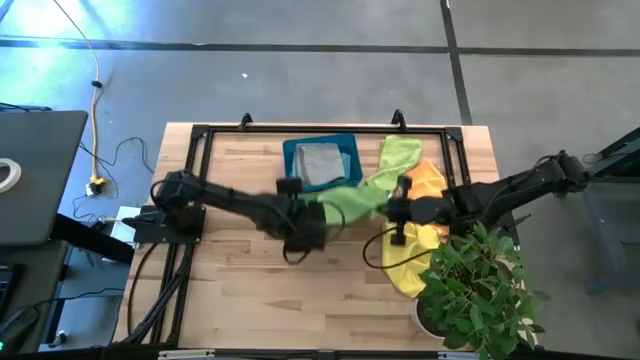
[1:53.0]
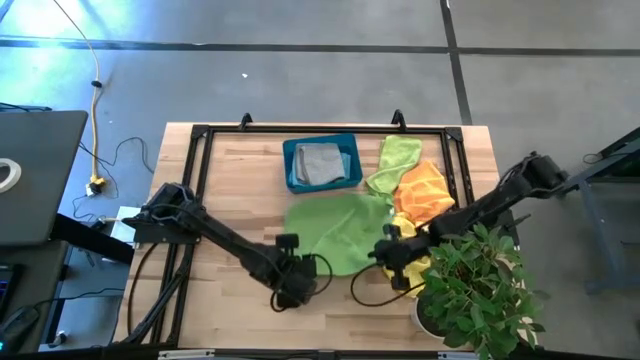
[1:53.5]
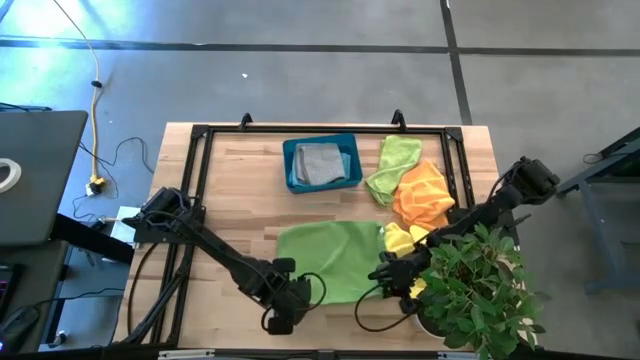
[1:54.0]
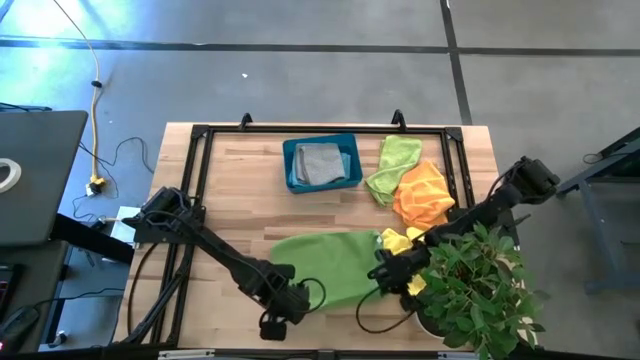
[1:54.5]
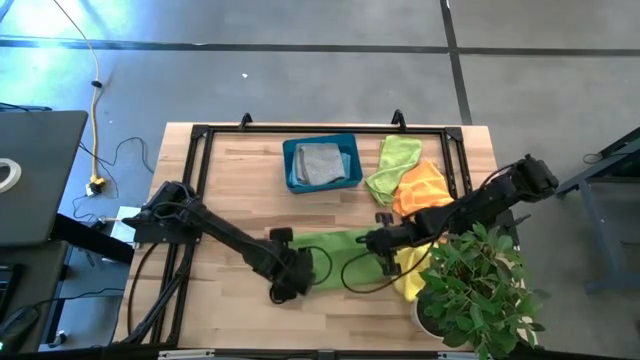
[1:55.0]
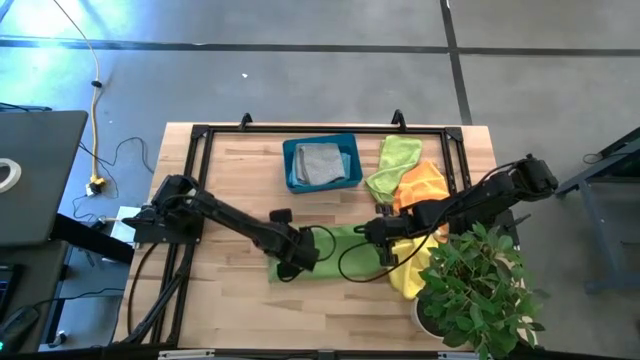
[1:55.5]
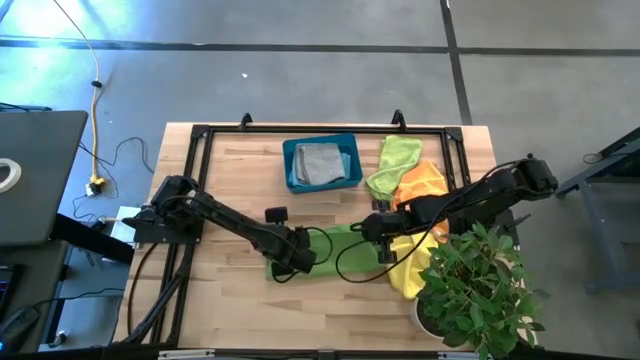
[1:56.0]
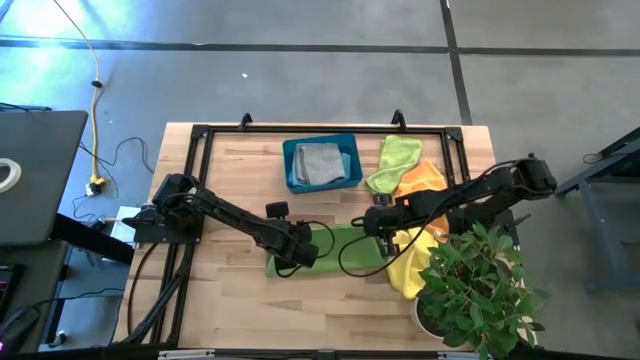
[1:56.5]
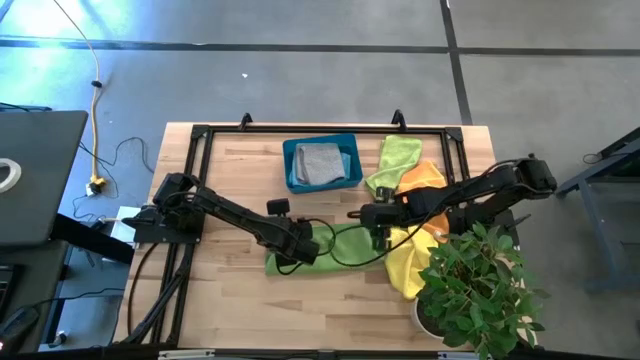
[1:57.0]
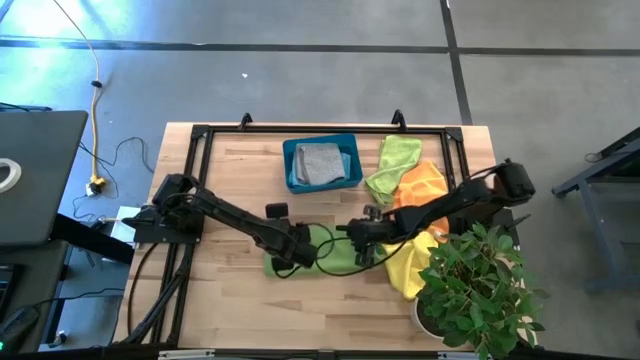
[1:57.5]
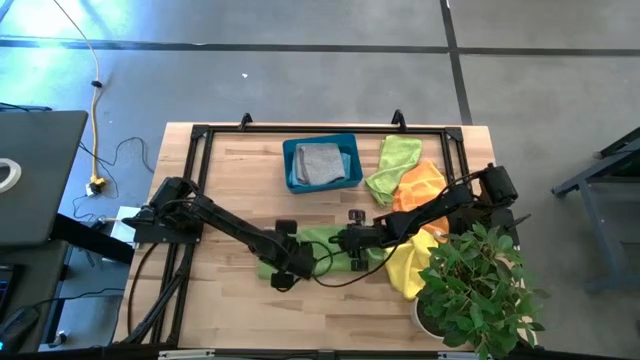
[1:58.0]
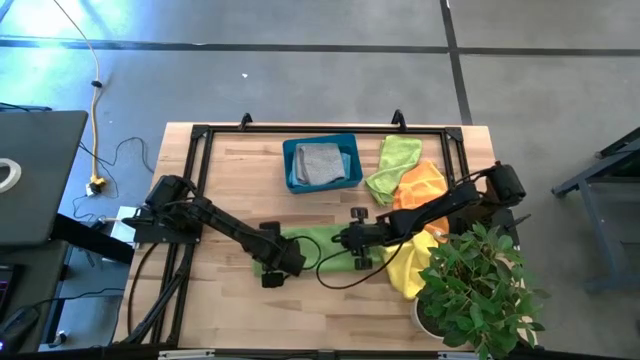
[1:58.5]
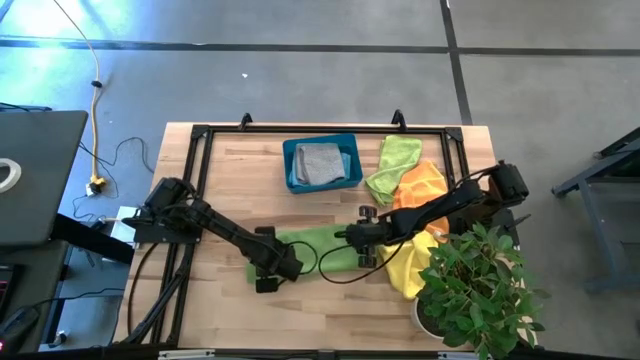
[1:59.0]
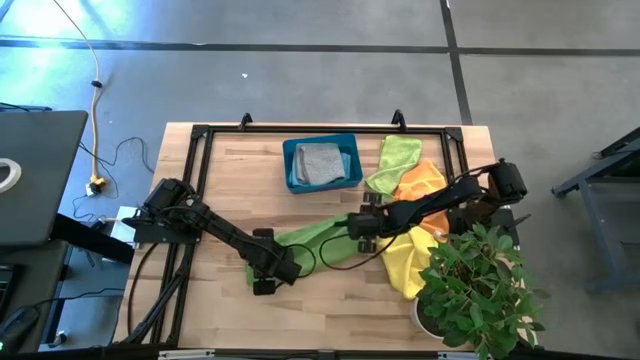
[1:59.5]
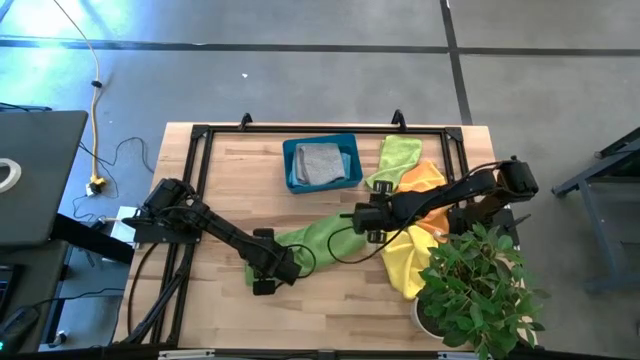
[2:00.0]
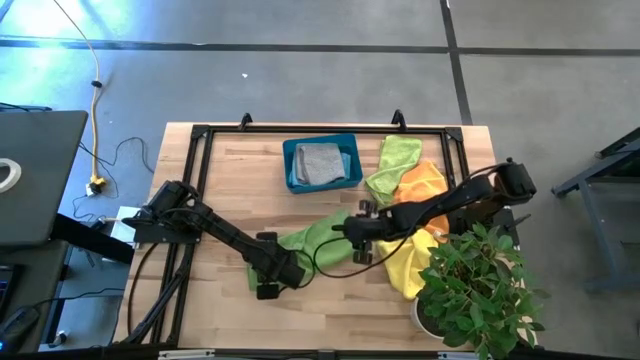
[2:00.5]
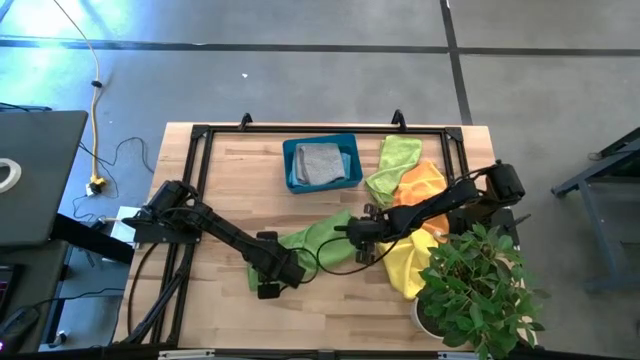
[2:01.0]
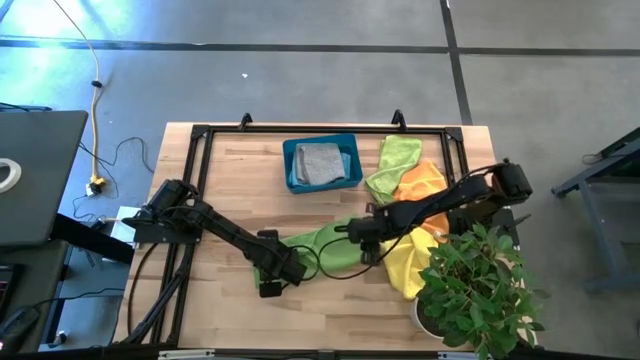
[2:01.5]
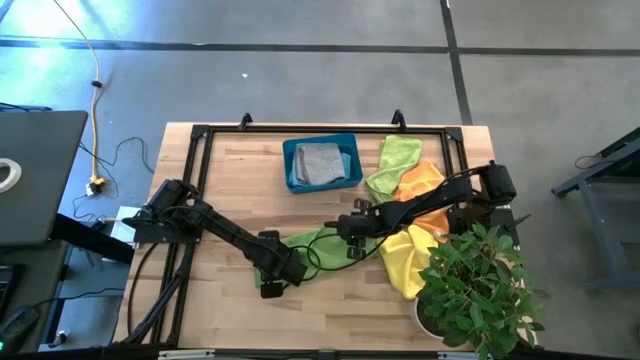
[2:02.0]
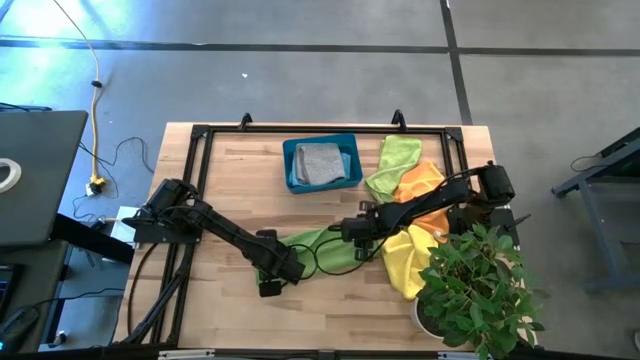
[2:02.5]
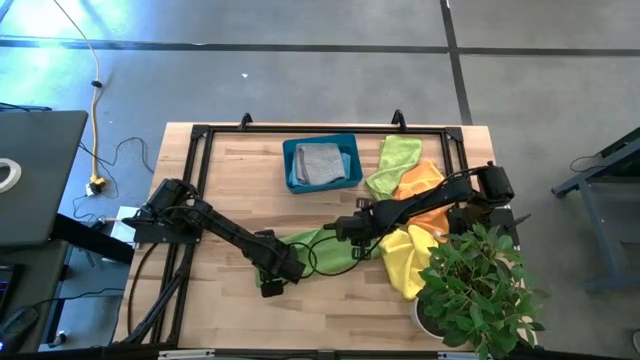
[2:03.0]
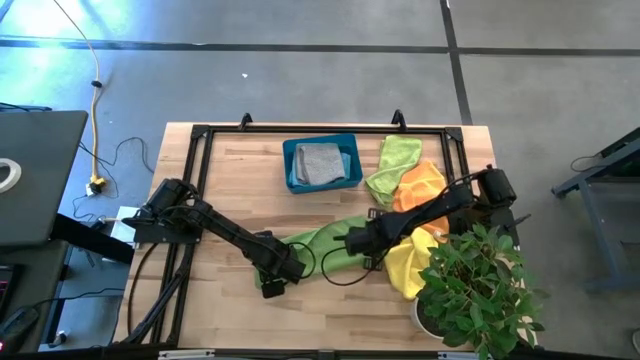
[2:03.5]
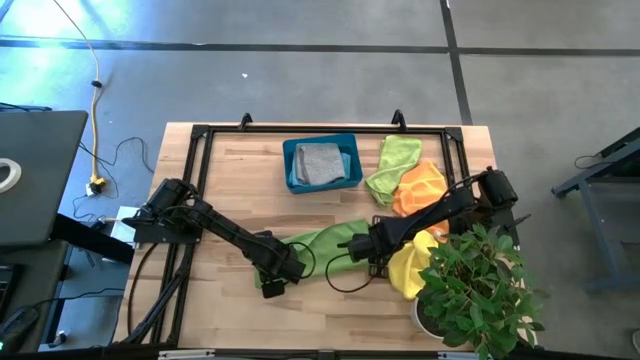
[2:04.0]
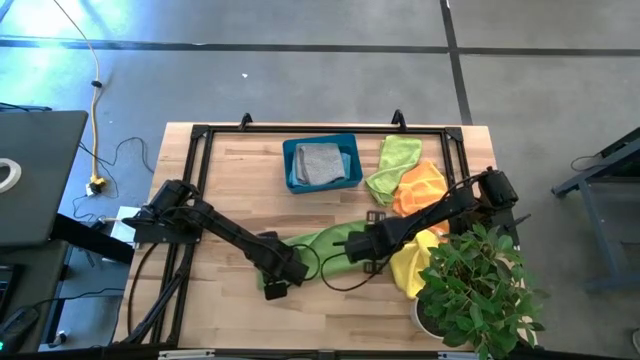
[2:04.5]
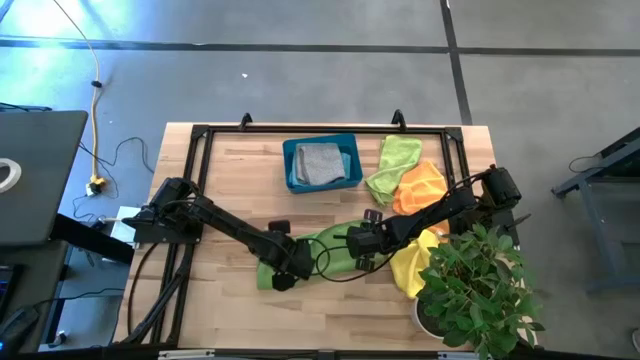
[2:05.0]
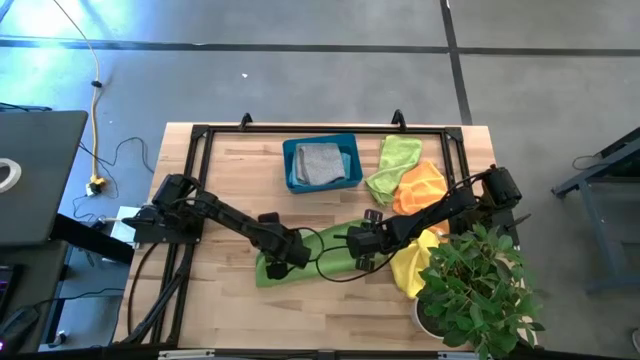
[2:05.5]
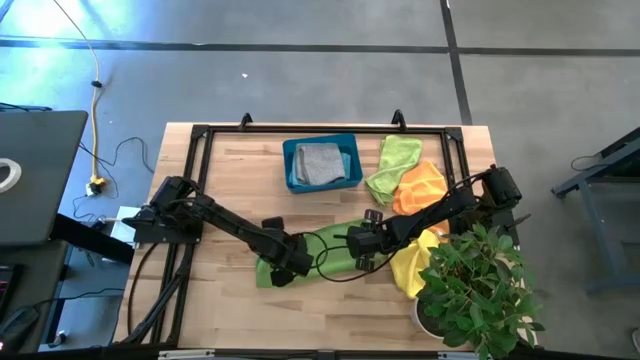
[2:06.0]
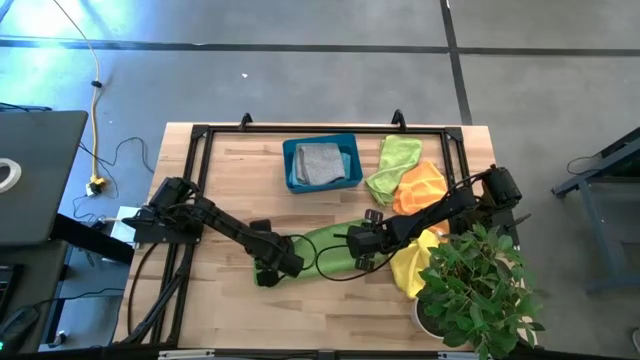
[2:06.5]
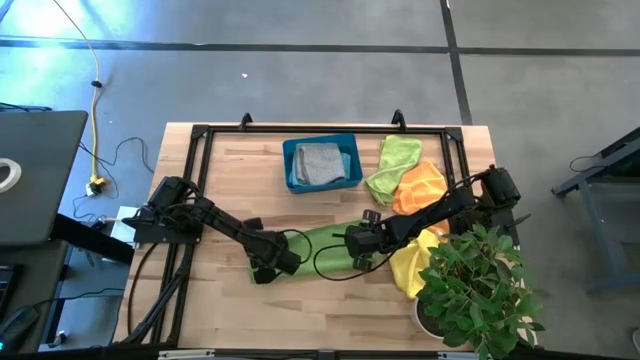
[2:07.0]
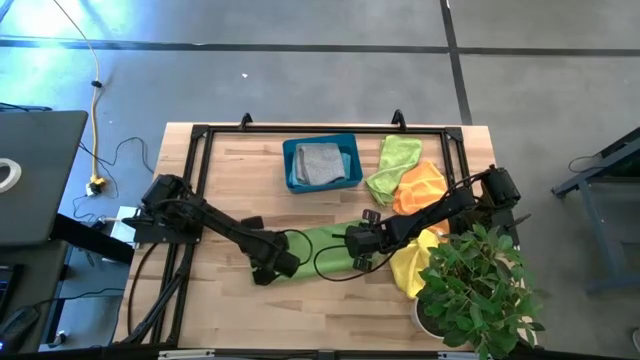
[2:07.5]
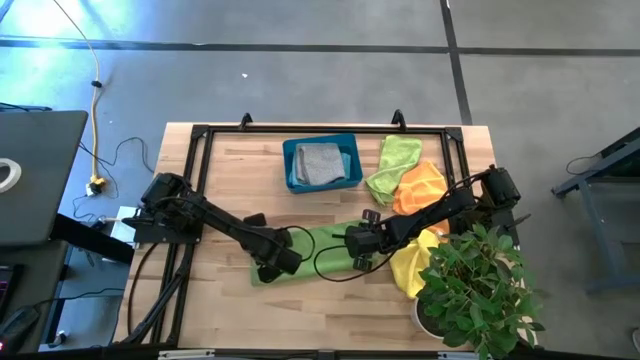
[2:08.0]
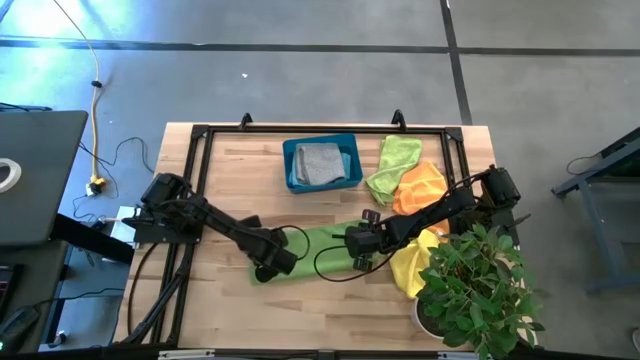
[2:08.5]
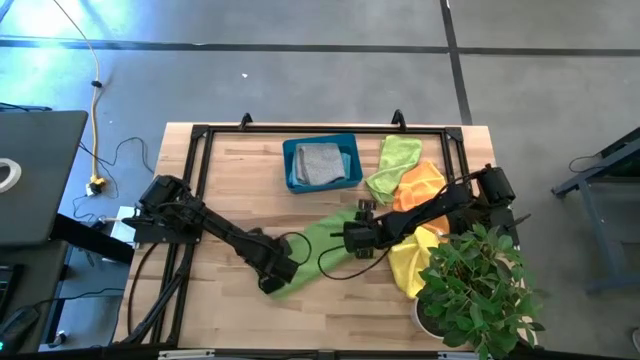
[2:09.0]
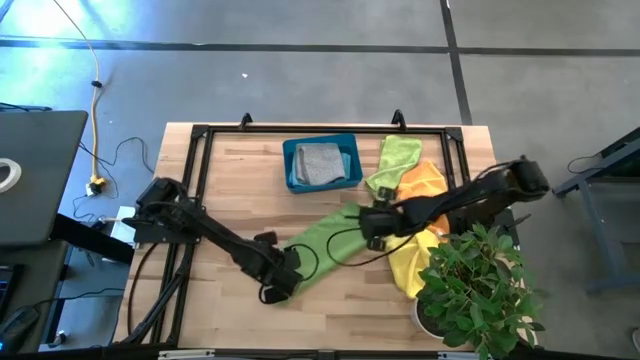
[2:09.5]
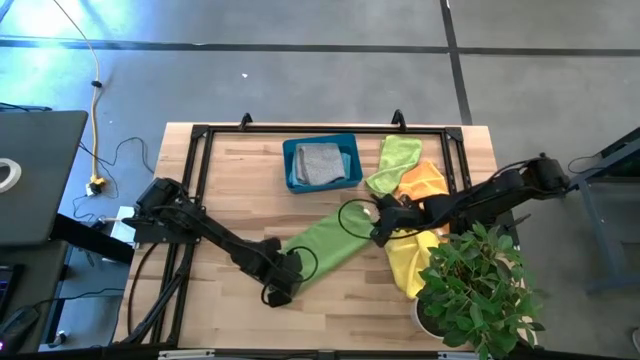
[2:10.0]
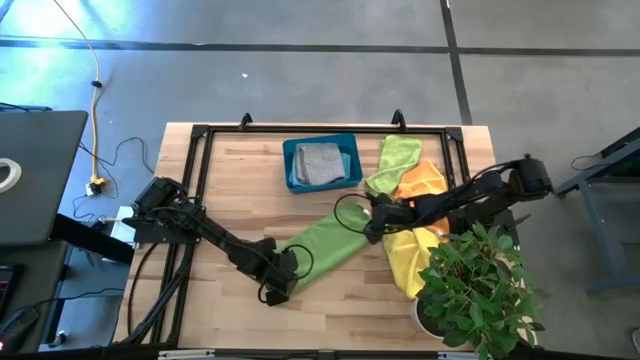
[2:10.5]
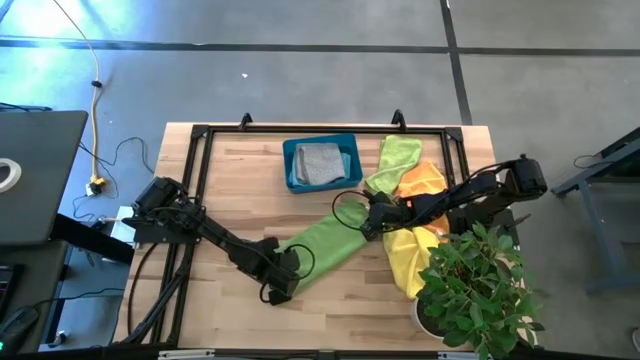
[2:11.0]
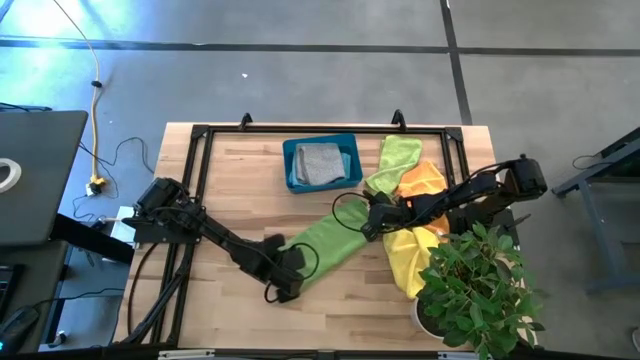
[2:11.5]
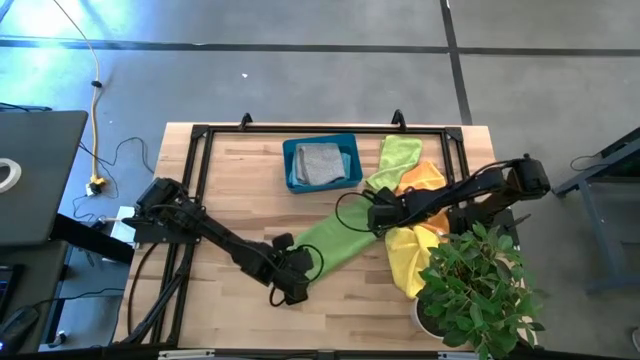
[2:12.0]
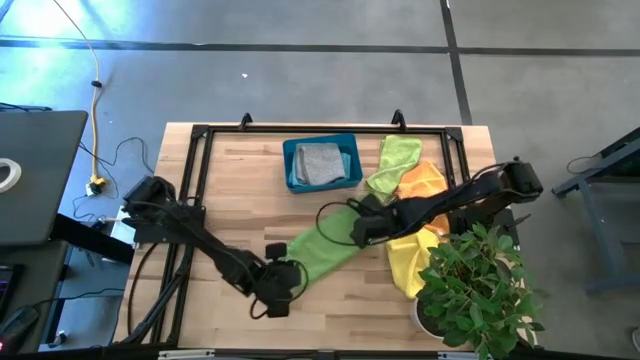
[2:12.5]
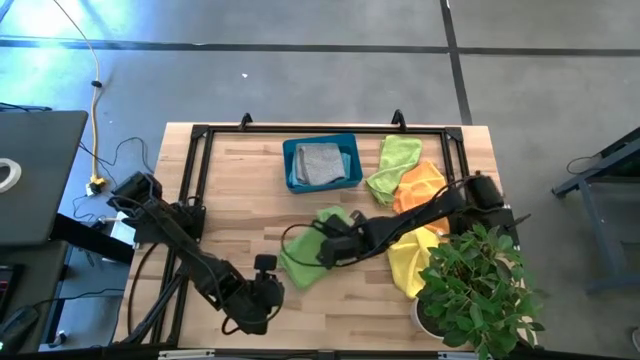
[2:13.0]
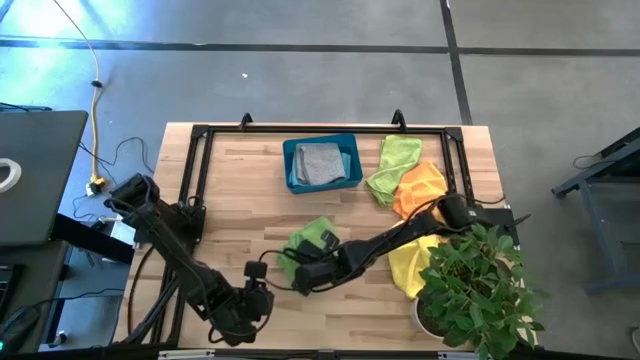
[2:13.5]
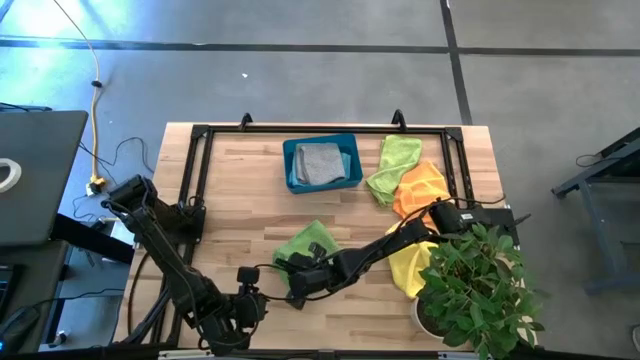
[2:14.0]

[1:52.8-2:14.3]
Task: Fold microfiber towels
Fold the bottom left green microfiber cloth
